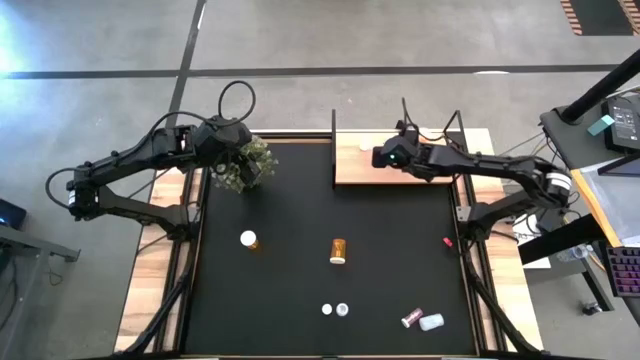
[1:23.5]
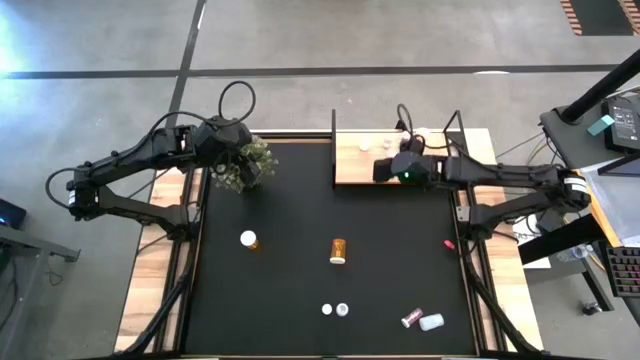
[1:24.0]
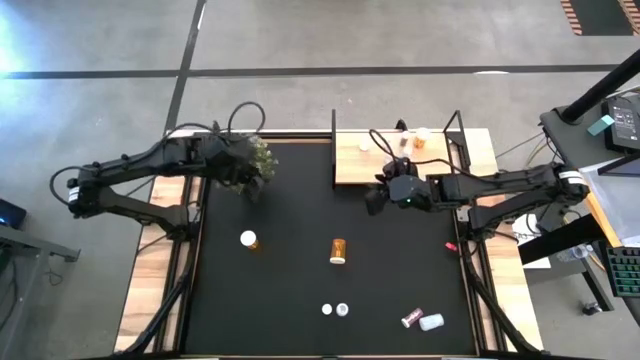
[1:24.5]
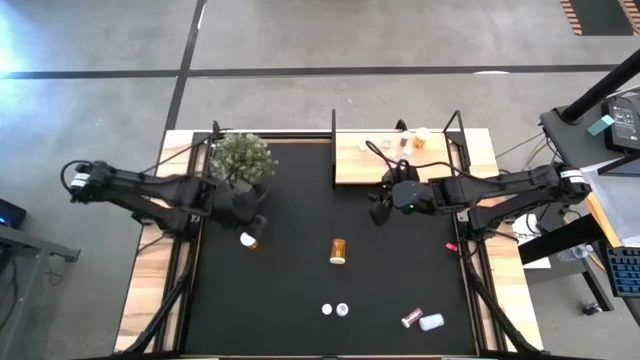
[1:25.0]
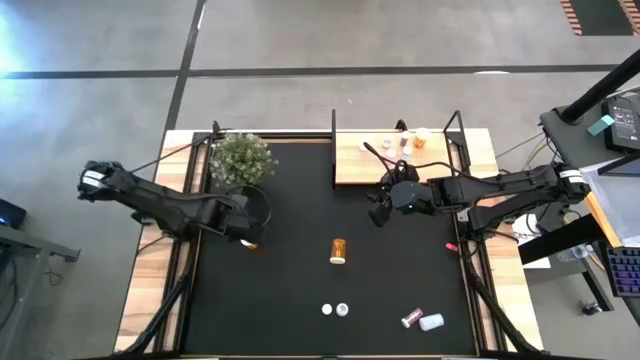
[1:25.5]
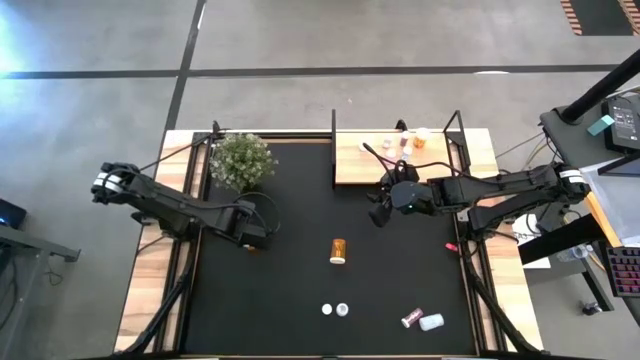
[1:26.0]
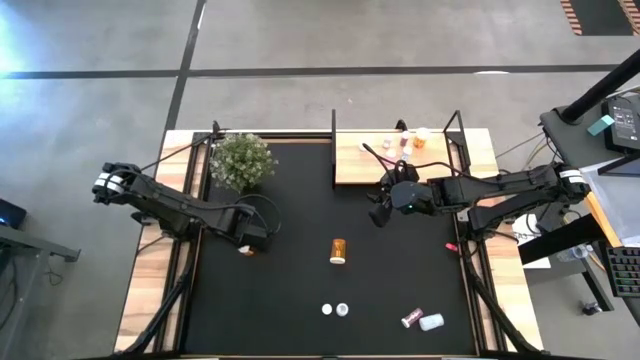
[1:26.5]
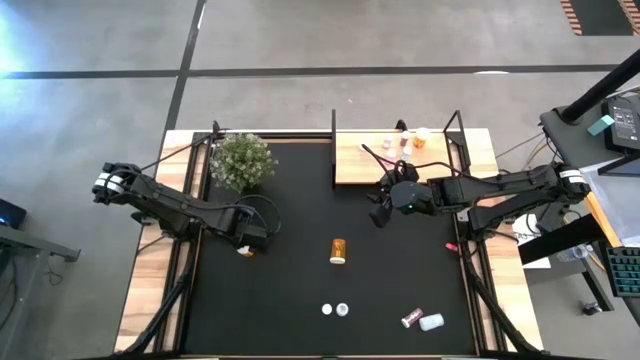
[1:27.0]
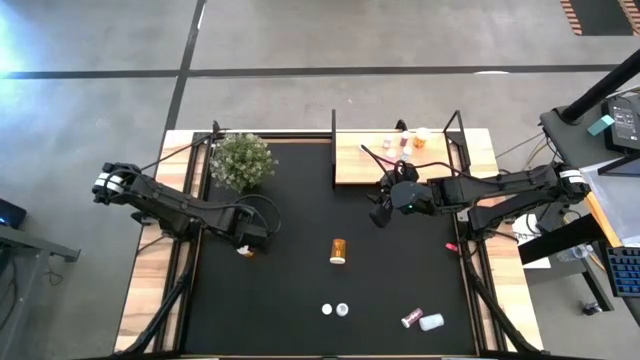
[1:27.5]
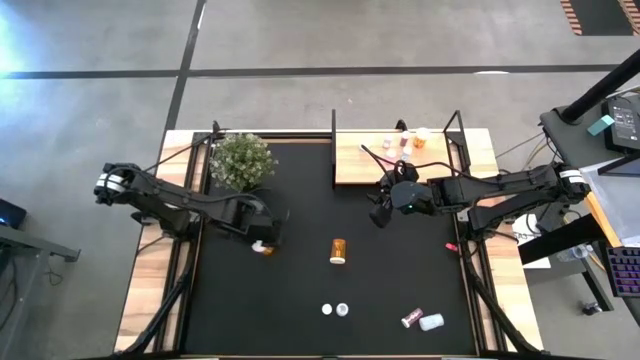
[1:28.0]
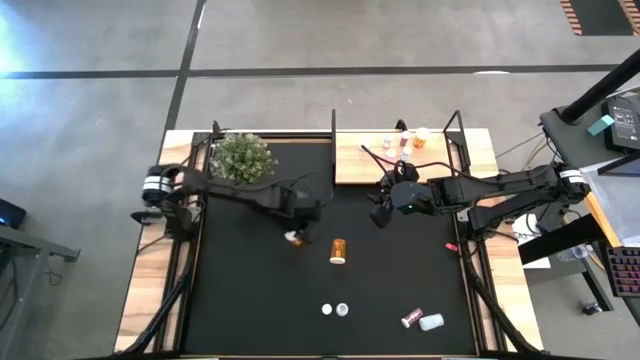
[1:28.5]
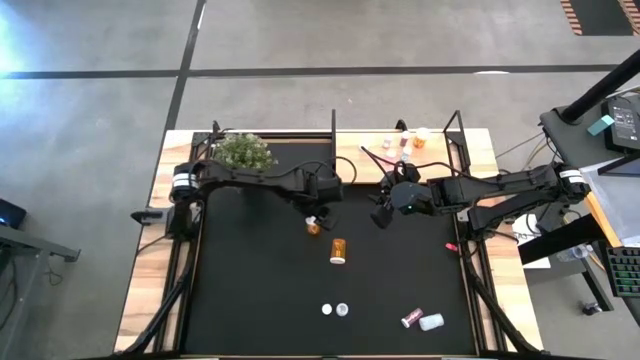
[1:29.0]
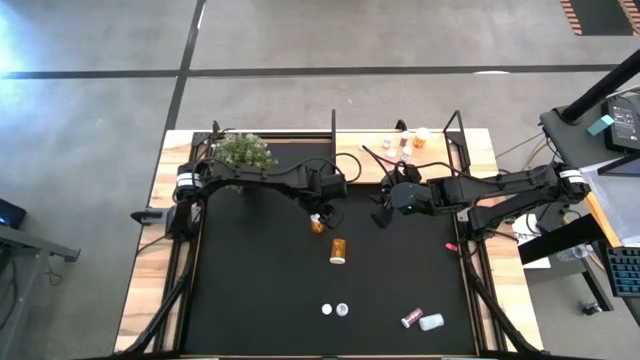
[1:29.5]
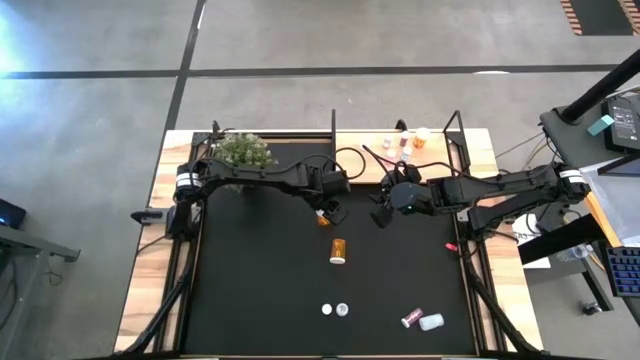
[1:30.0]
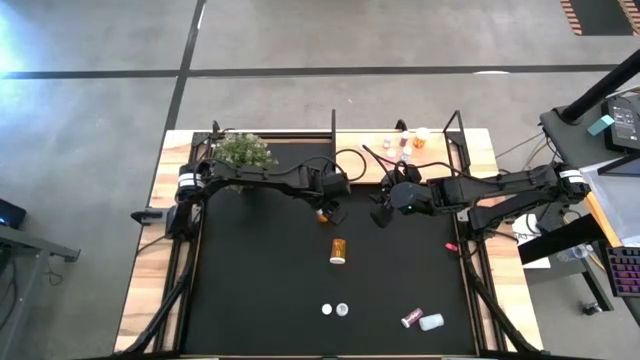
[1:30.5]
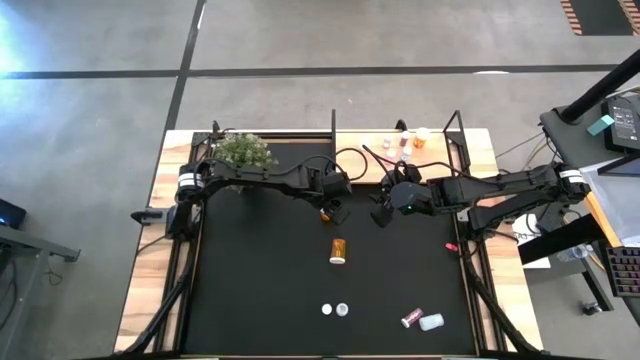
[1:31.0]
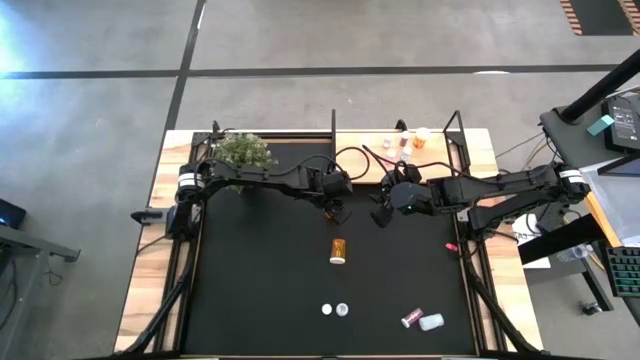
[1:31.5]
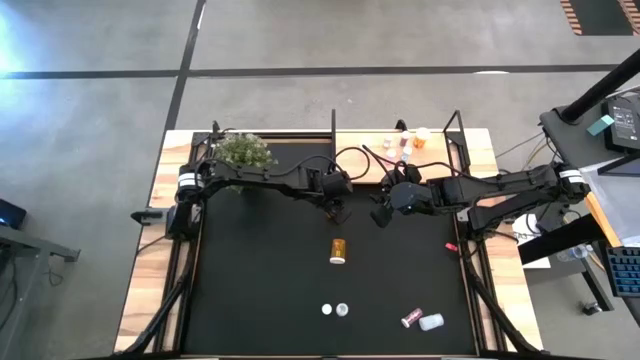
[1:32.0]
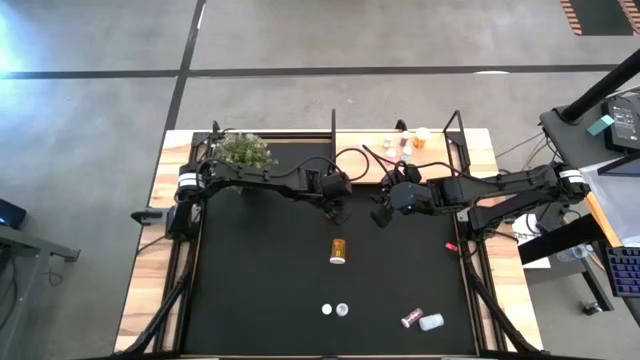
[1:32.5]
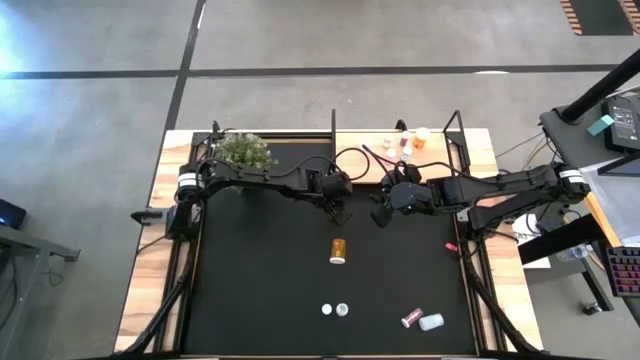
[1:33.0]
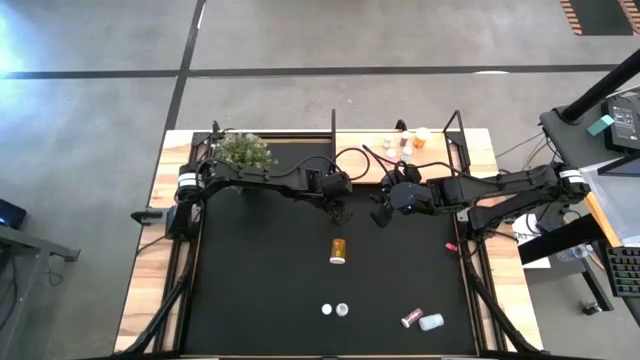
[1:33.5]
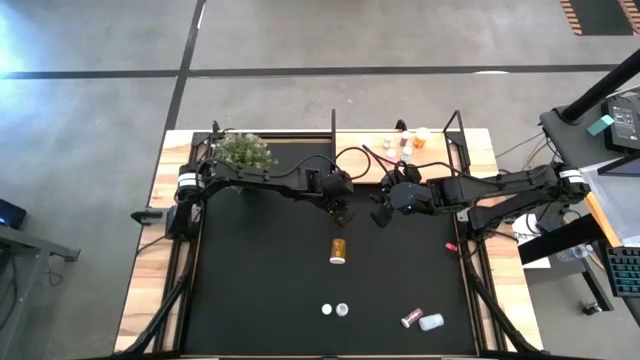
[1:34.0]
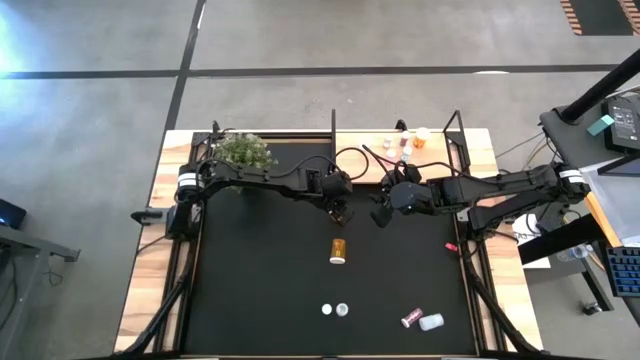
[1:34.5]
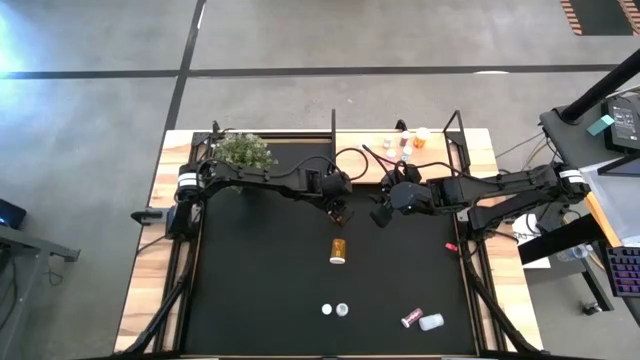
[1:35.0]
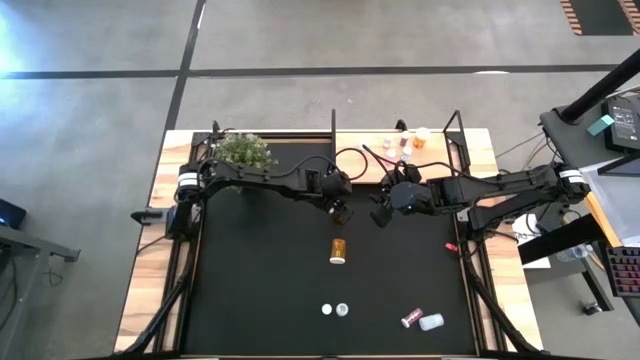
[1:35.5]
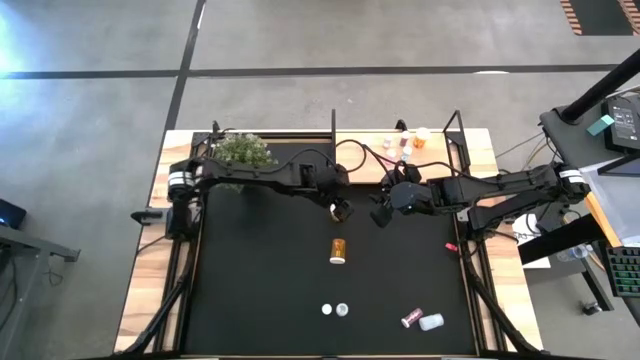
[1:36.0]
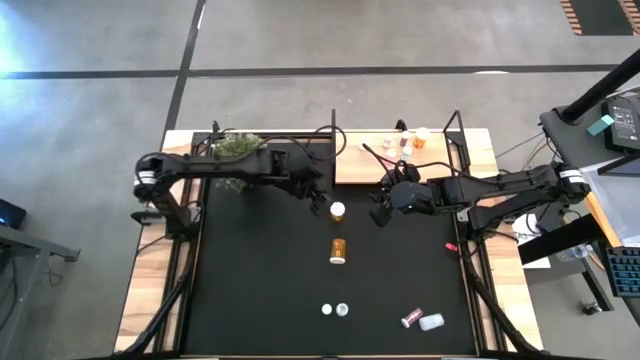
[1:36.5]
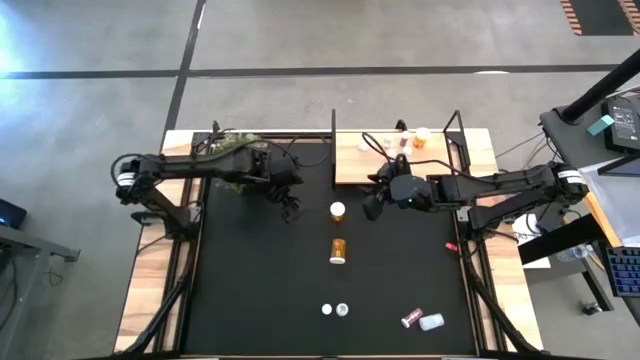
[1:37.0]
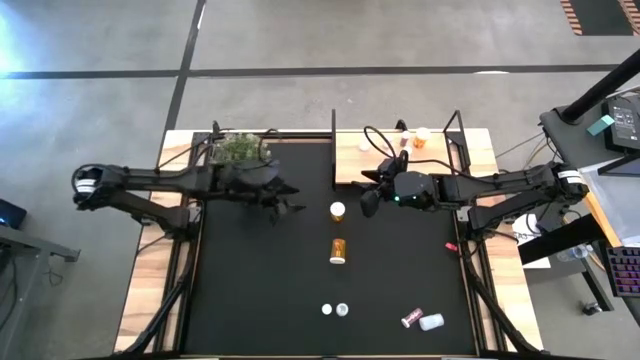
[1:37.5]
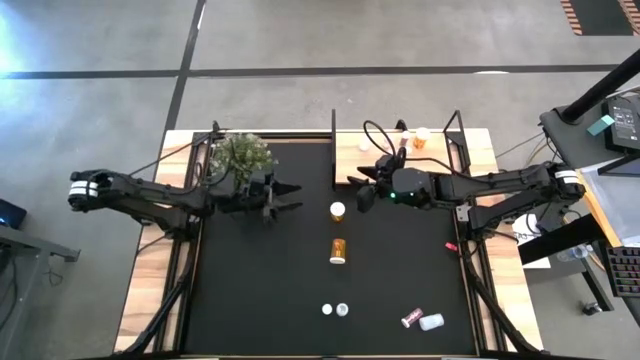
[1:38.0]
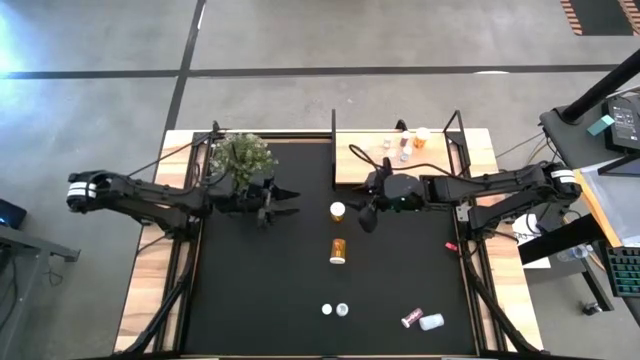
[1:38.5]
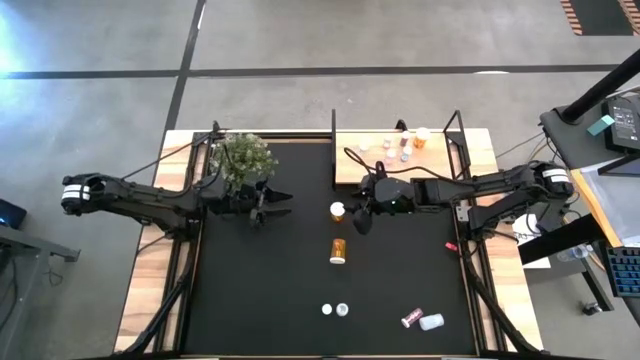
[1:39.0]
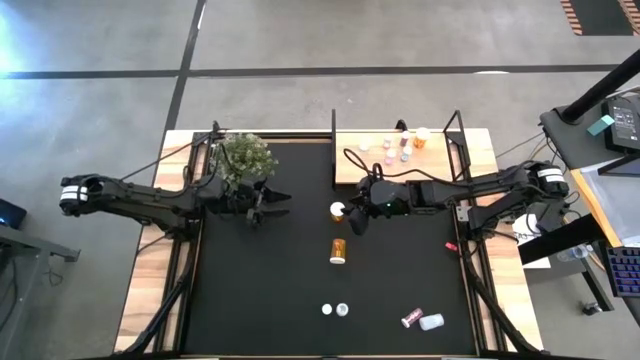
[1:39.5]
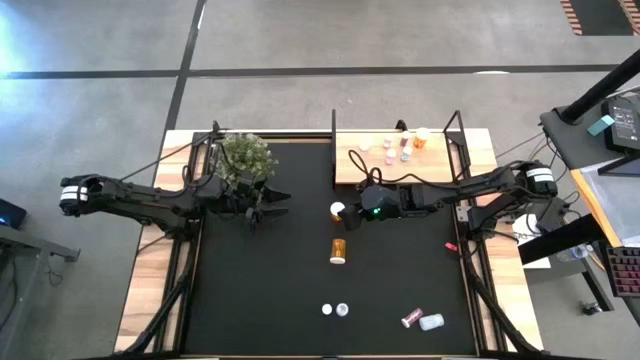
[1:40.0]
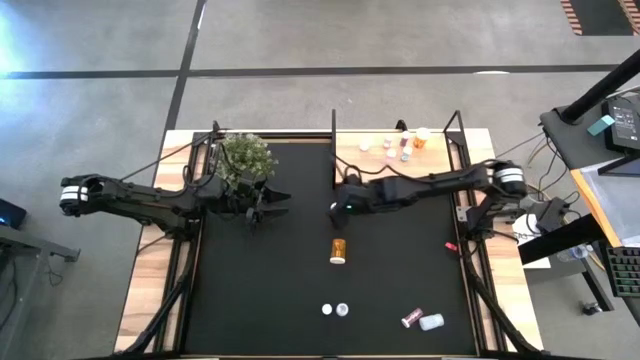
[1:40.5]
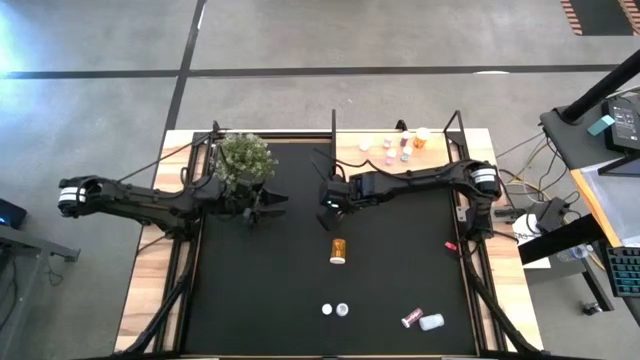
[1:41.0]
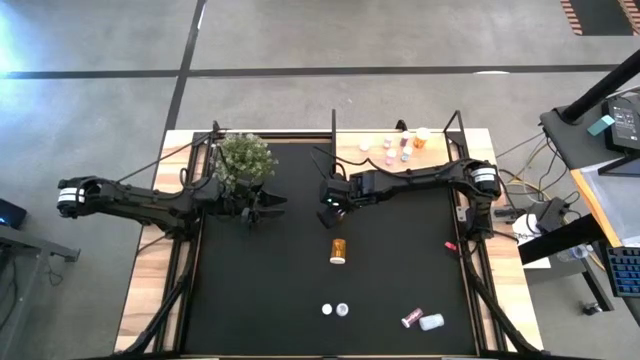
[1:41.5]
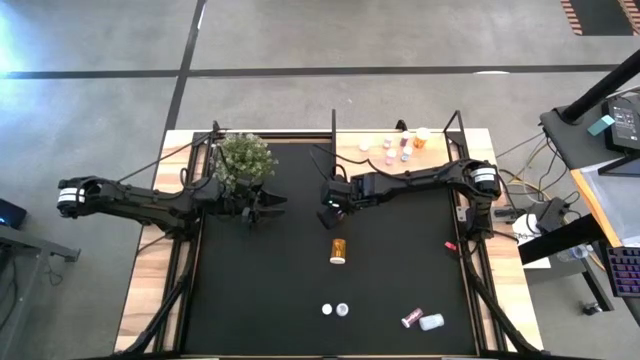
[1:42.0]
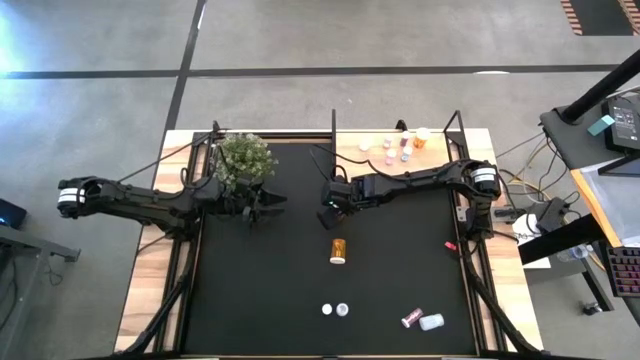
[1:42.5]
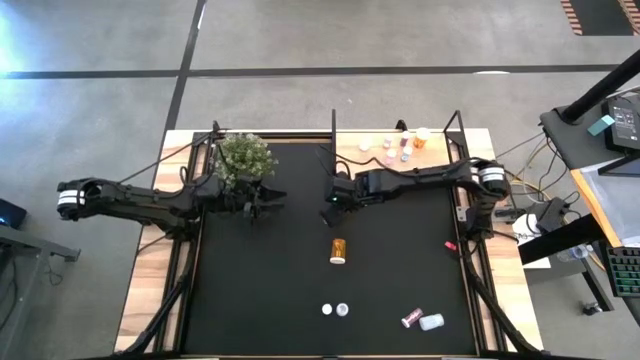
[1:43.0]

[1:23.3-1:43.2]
Task: Pick and place medicine bottles onto shelf by color
Put the left orange pill bottle on the shelf aligned with the other orange pill bottle
